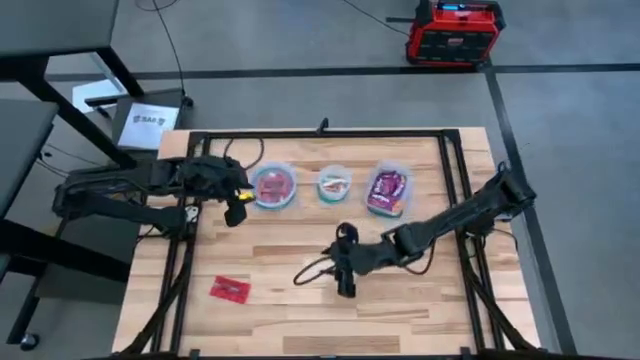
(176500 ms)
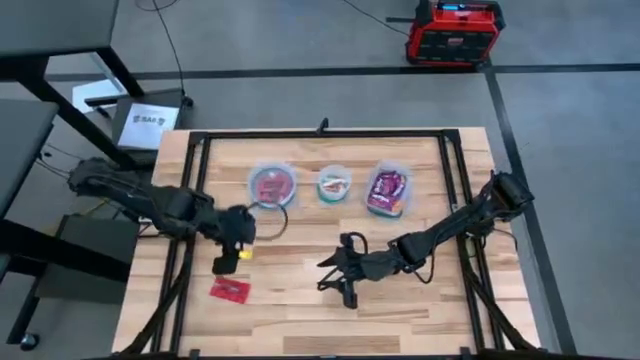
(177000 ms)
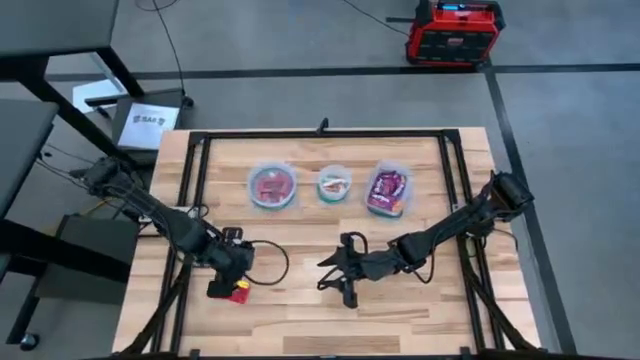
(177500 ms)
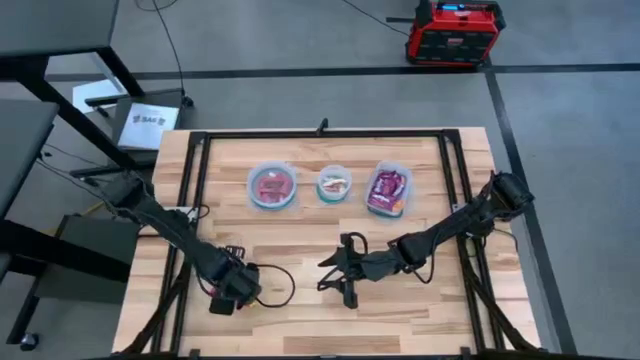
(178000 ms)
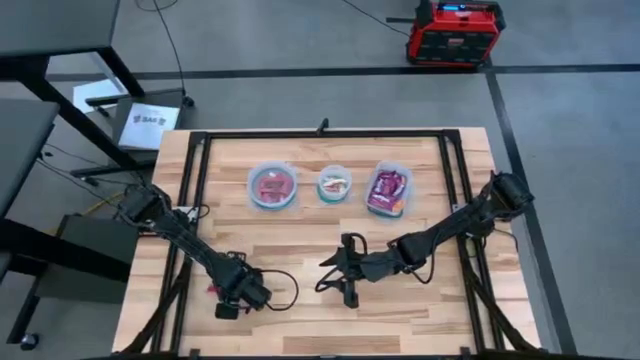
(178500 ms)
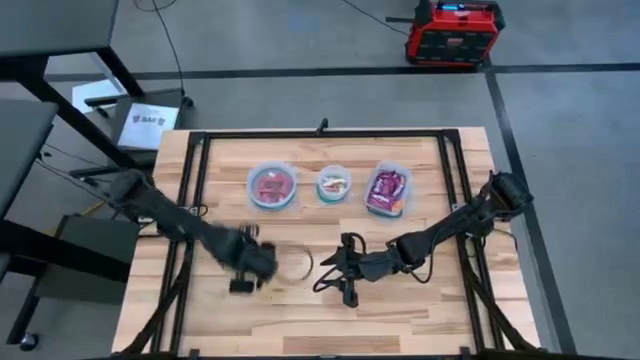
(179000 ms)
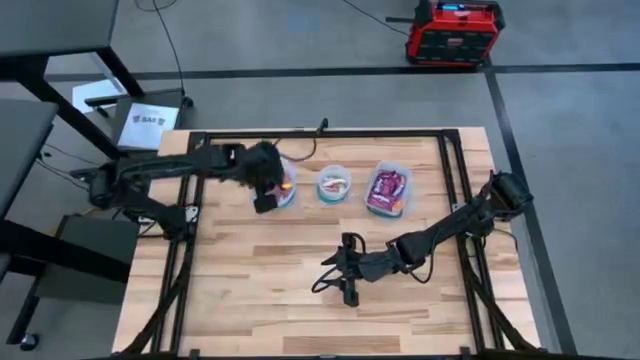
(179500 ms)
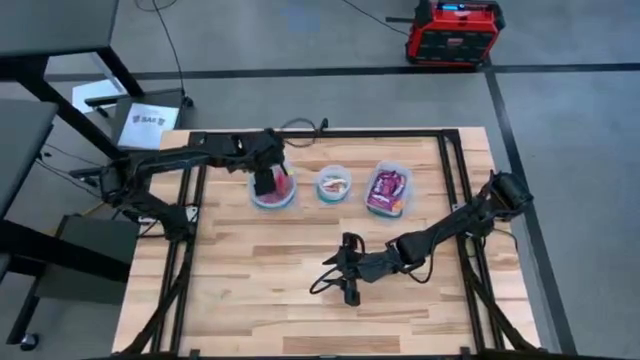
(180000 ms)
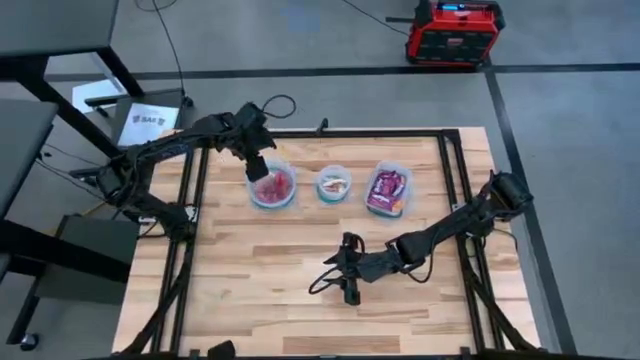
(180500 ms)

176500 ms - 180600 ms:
Task: Sort candy
Put the red candy into the top right transparent bin

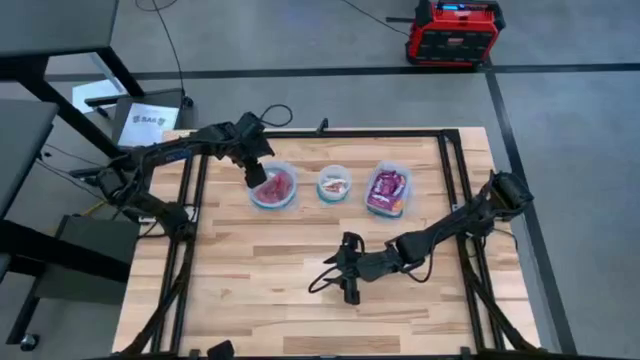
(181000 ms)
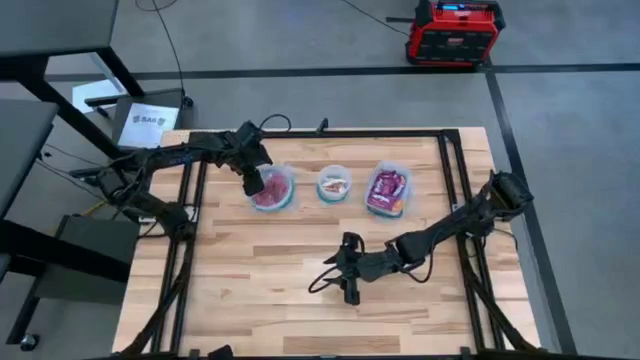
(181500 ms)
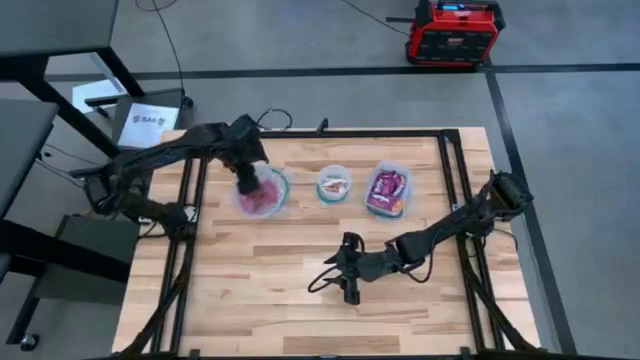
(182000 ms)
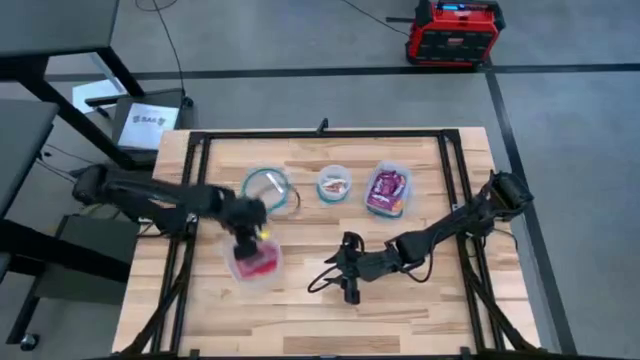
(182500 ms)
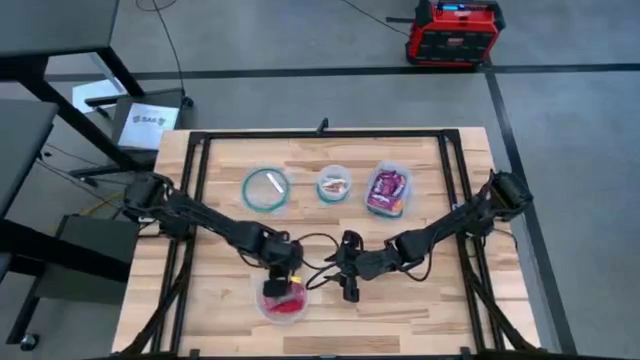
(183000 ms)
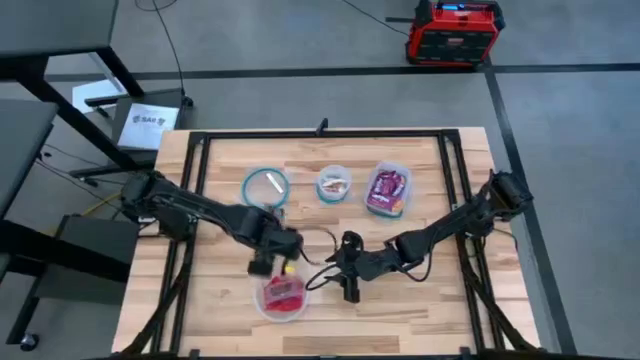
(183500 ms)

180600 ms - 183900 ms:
Move the top left transparent bin to the bottom left

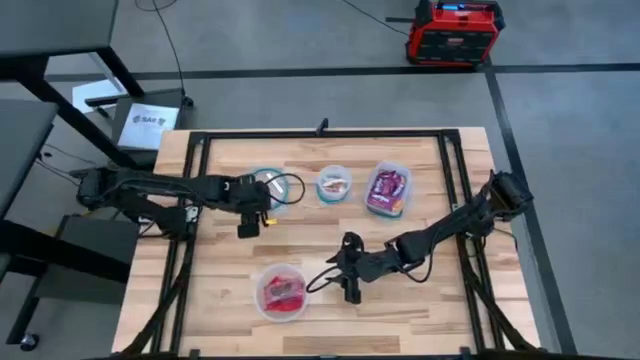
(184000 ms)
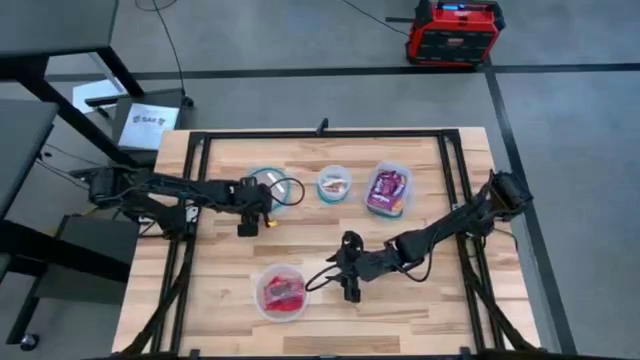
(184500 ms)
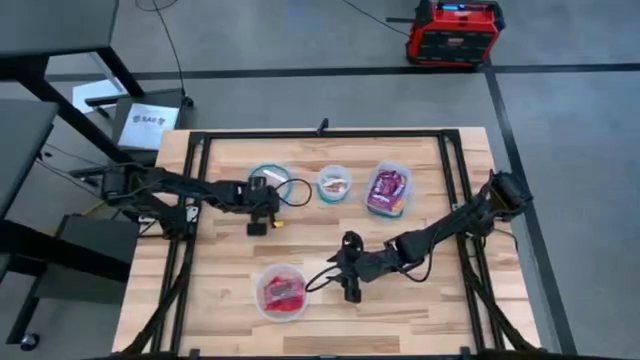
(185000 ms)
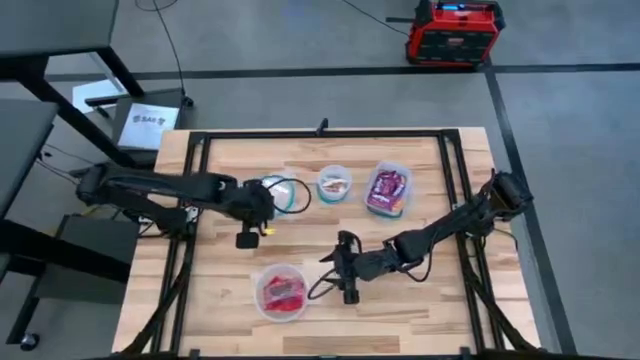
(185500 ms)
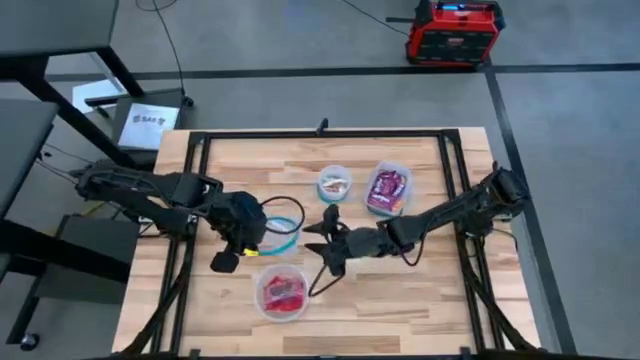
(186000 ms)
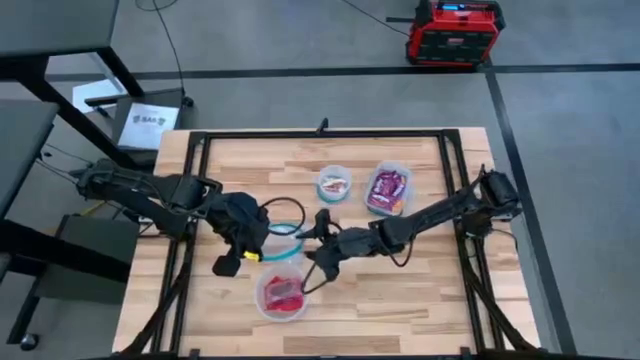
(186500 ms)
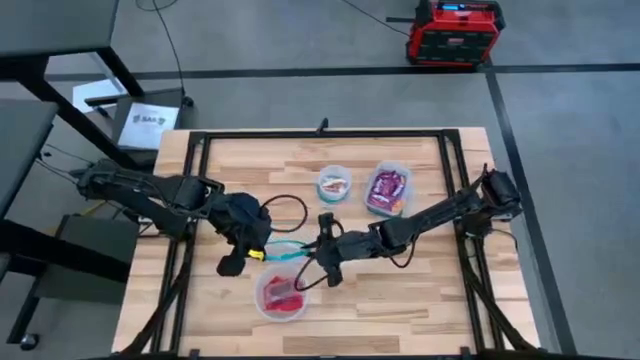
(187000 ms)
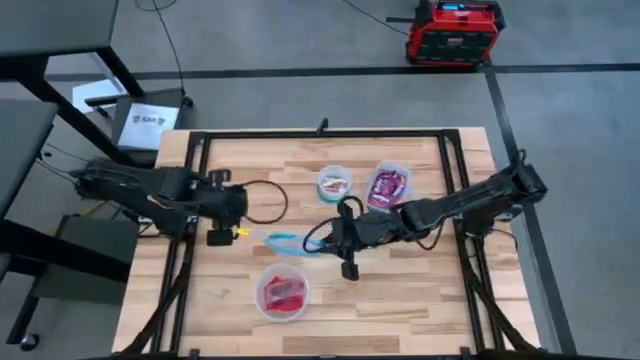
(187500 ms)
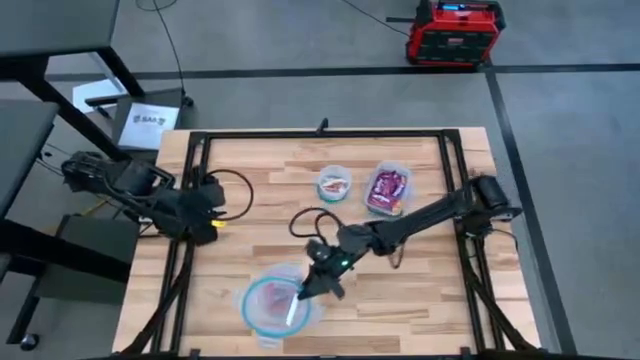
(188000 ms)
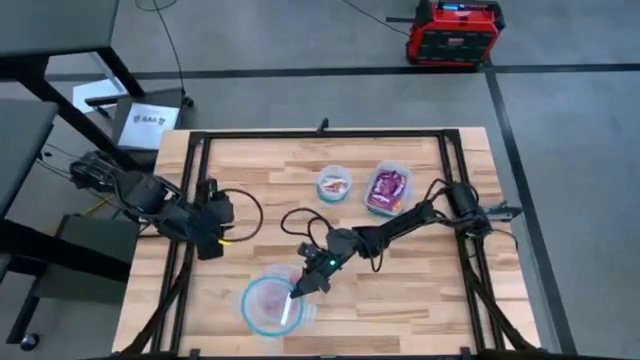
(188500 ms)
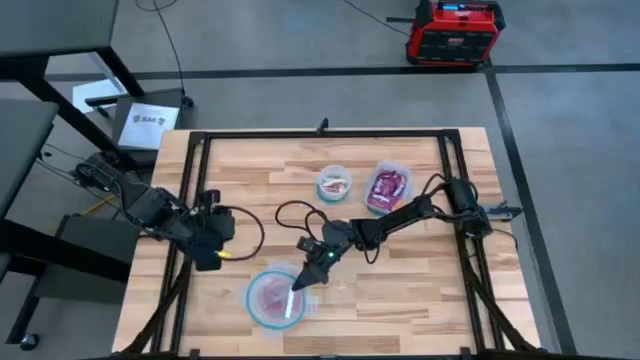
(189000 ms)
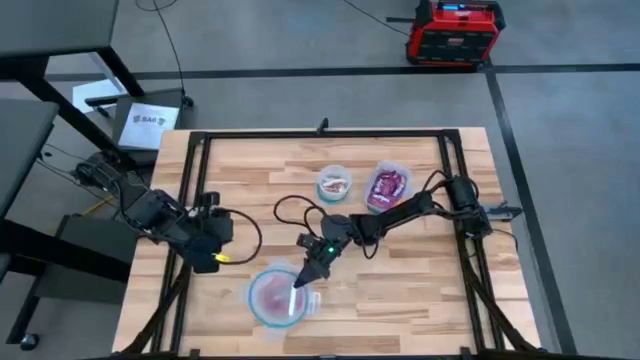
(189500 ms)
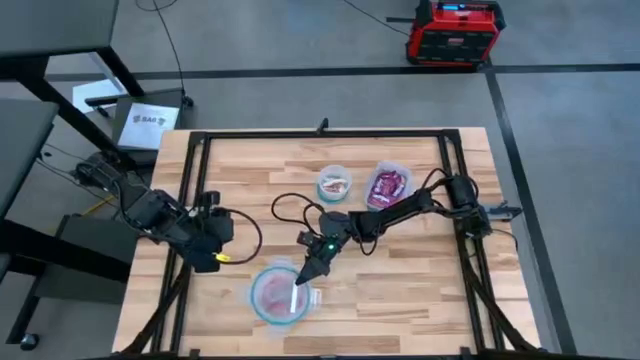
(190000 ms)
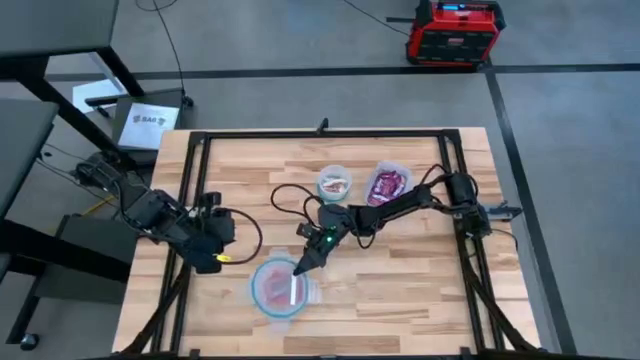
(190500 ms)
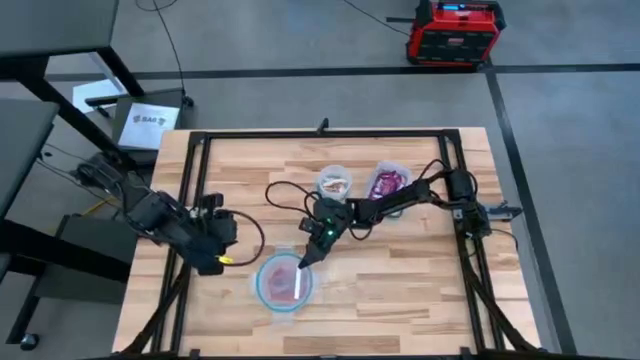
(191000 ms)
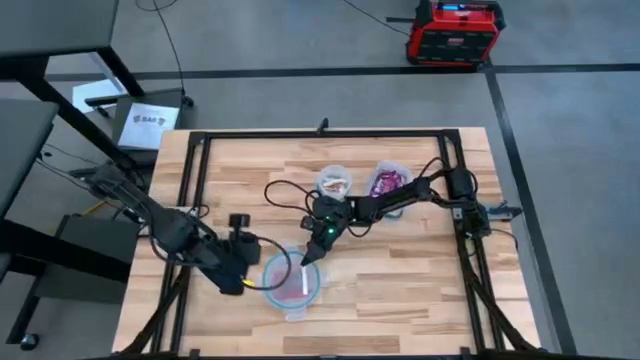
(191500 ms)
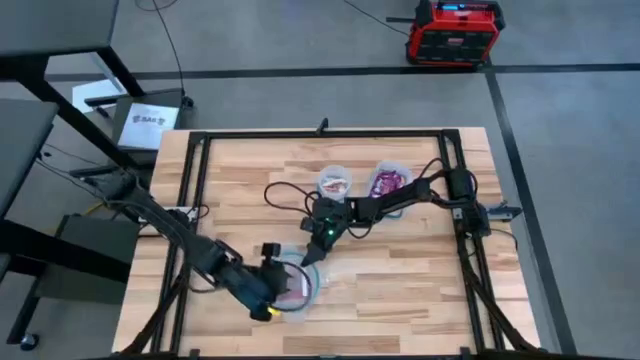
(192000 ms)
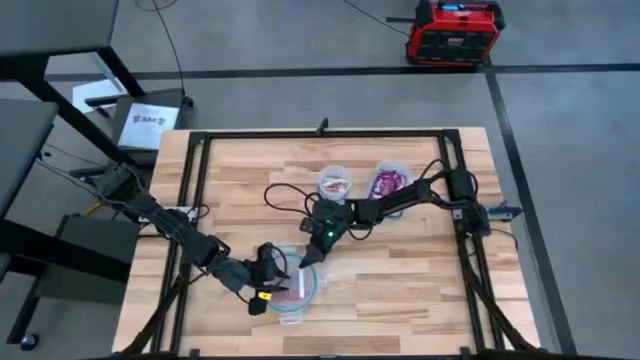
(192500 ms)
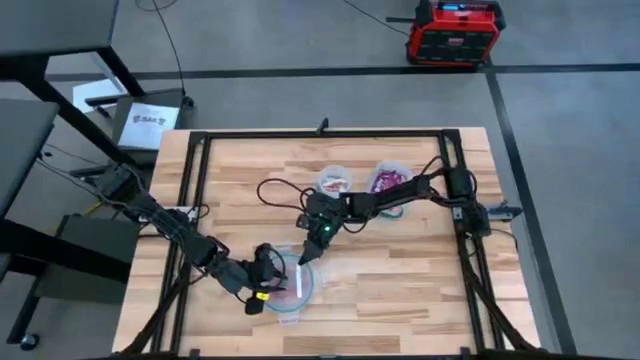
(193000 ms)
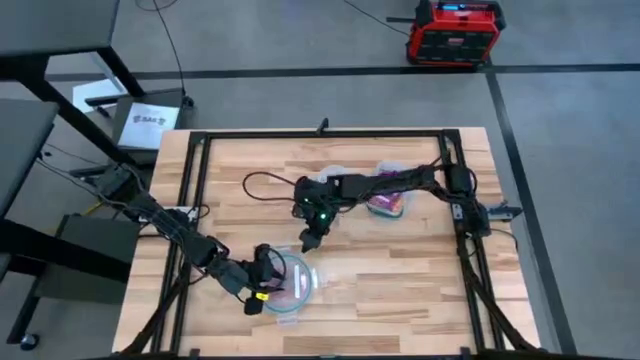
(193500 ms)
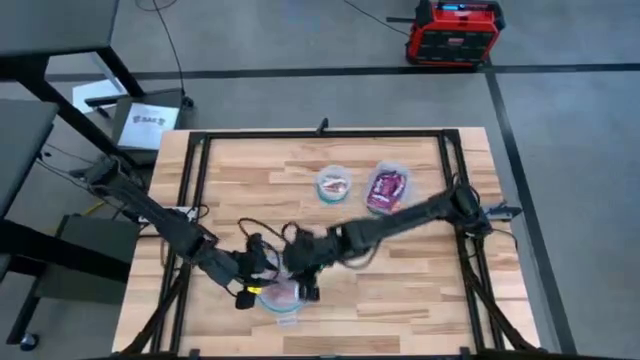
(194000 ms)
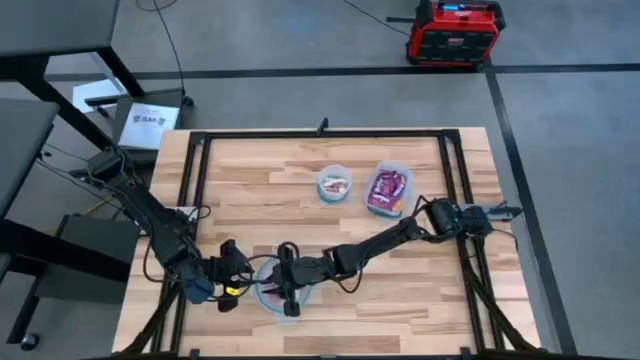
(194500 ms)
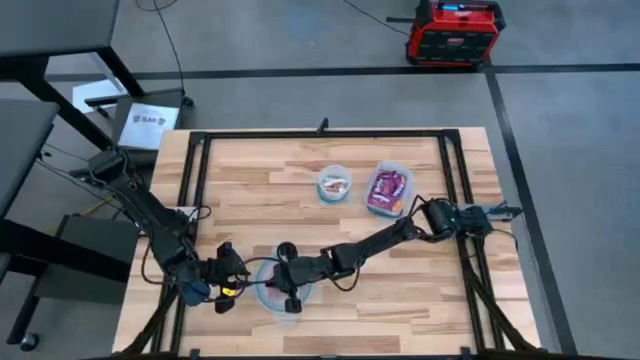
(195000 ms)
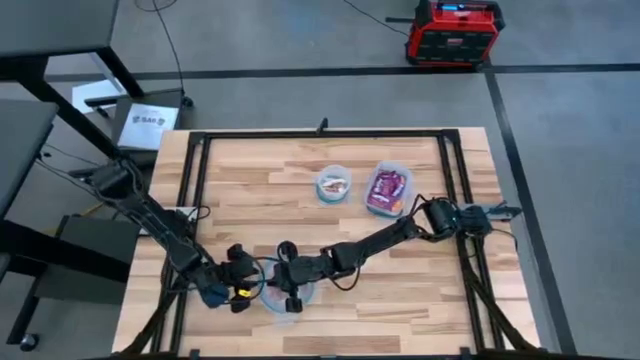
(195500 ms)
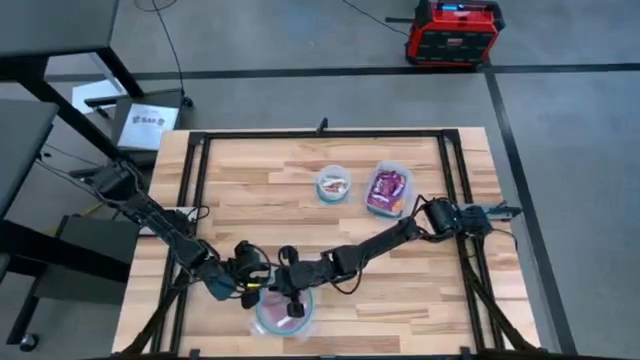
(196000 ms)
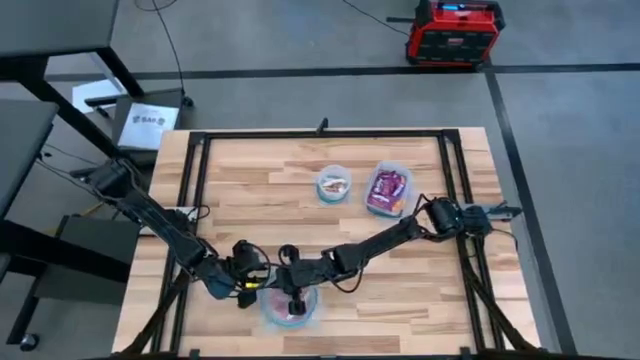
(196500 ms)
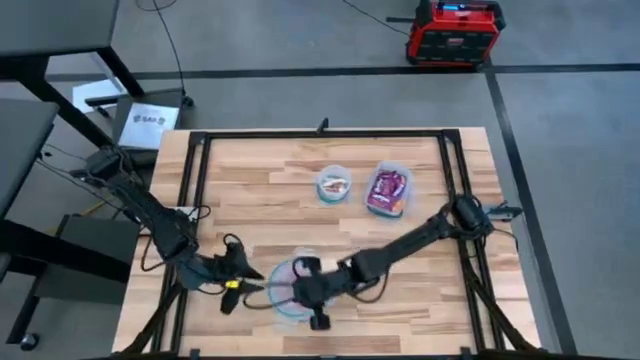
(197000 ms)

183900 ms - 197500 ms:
Close the bottom left transparent bin with the lid
